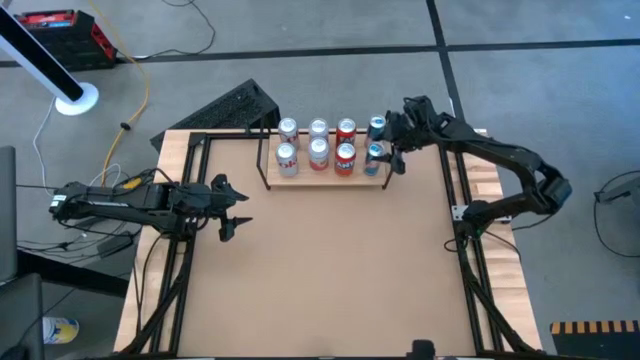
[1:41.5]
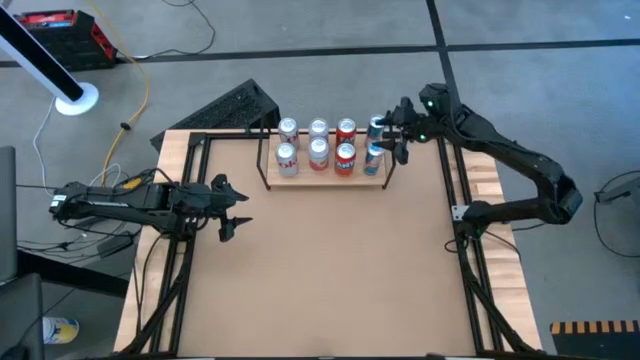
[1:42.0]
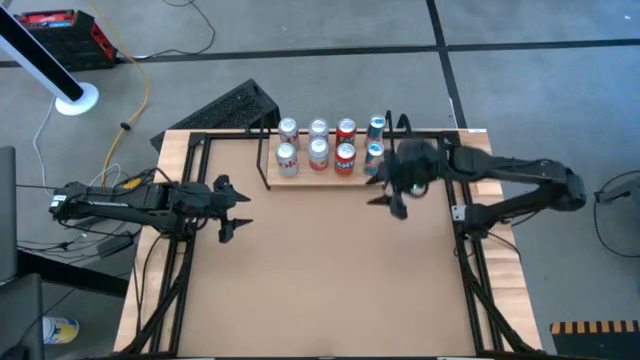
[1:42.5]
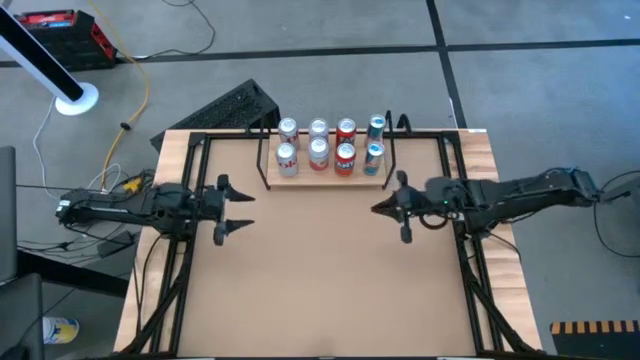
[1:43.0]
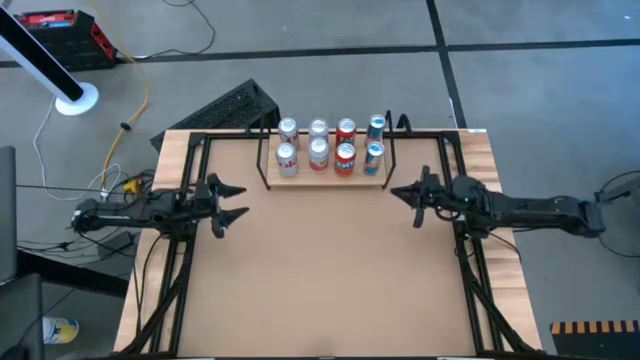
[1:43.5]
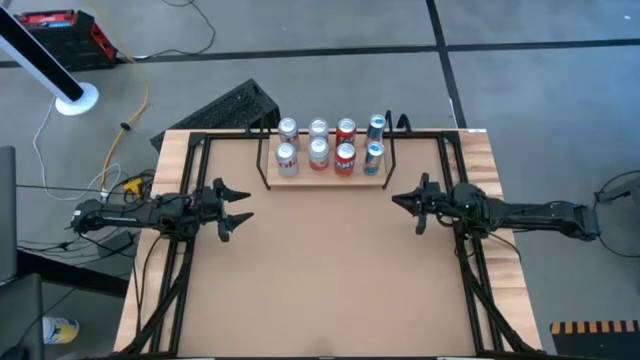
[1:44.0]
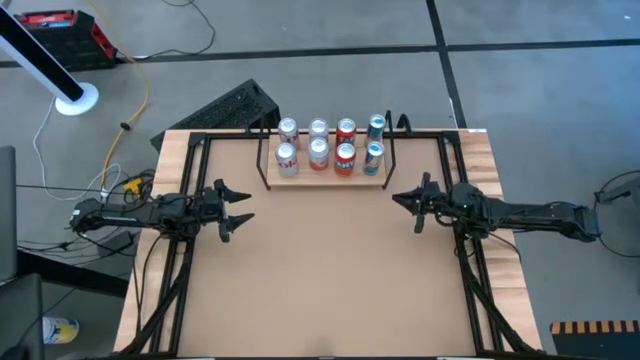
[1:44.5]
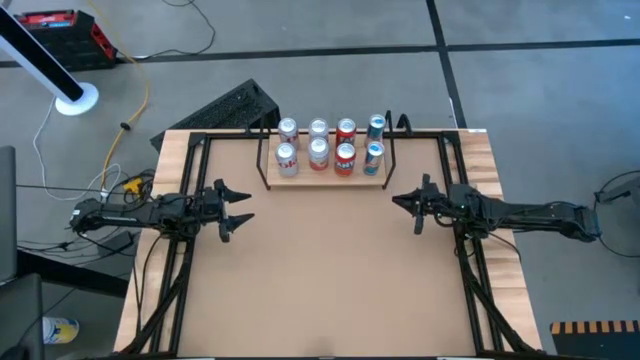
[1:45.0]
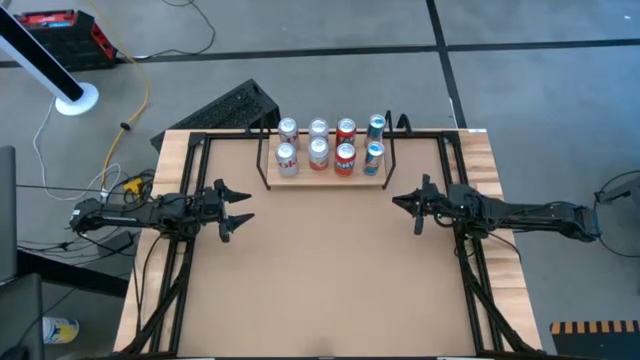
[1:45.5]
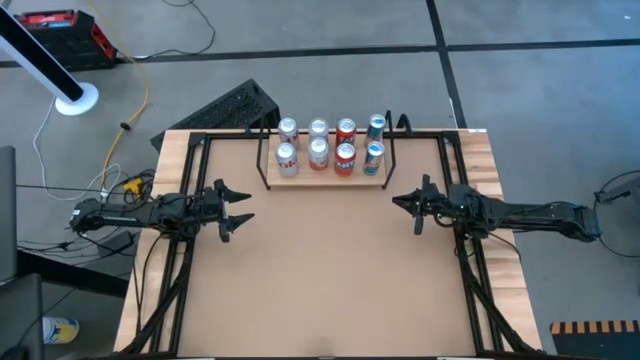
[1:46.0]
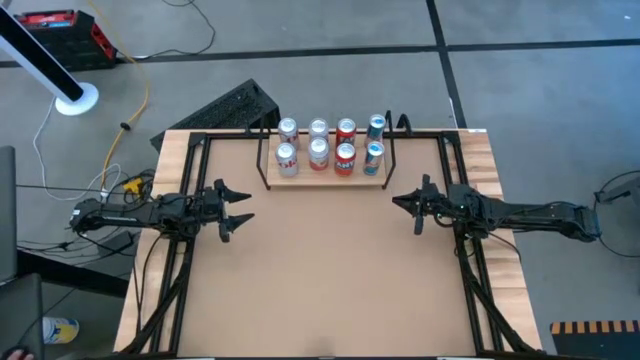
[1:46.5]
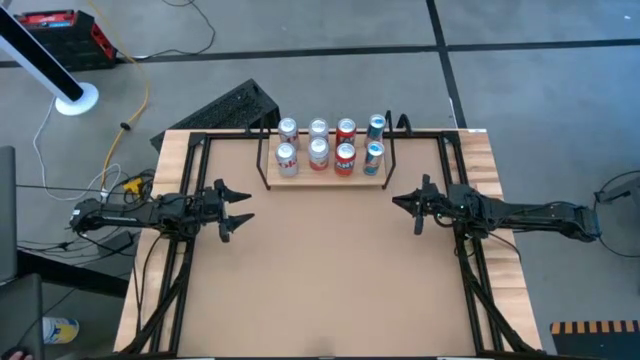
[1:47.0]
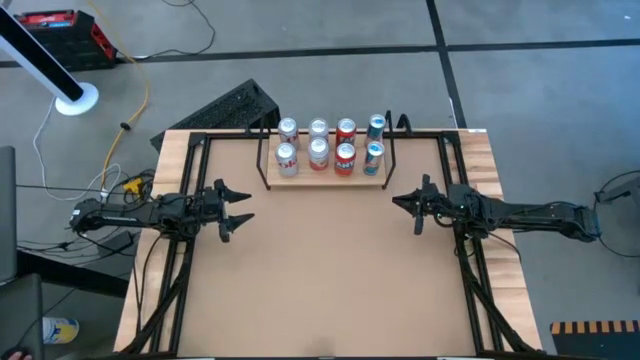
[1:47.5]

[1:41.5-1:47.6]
Task: Place canned beverage on shelf
Return to Home Position

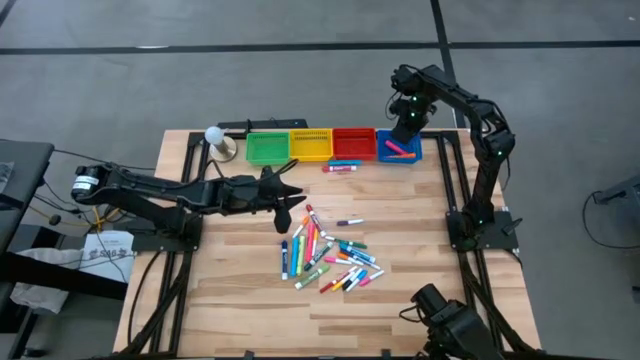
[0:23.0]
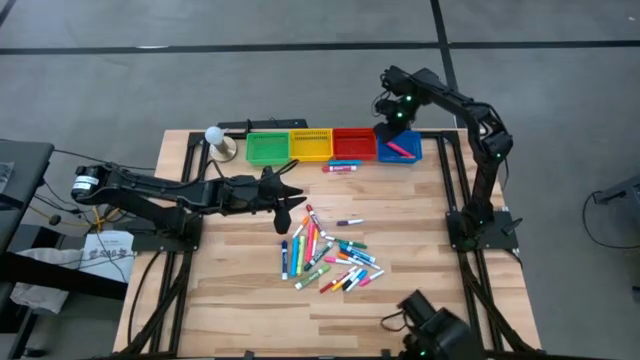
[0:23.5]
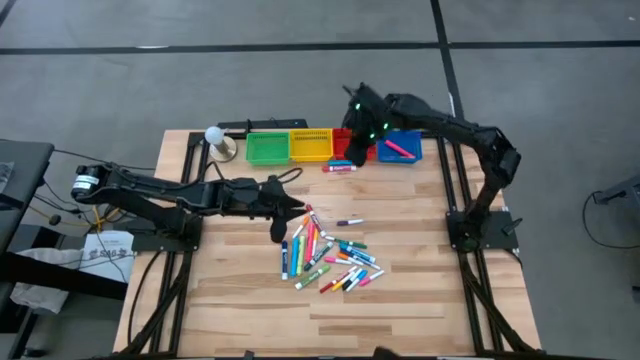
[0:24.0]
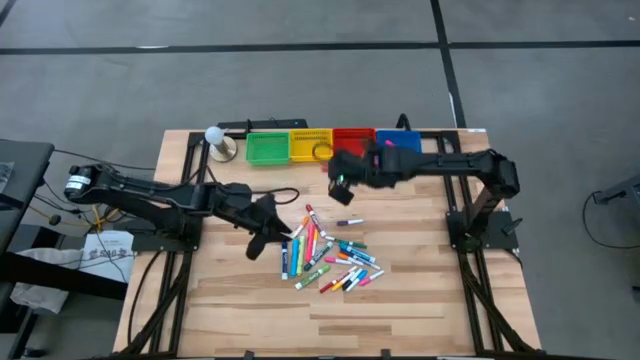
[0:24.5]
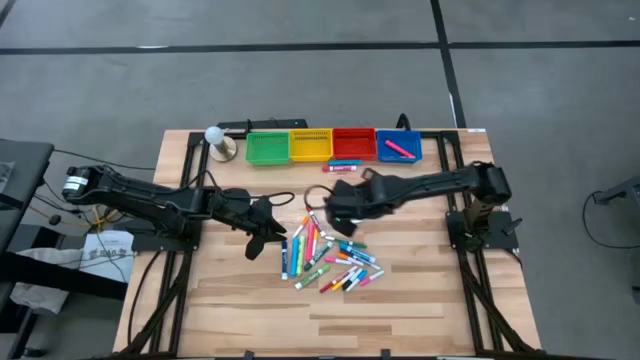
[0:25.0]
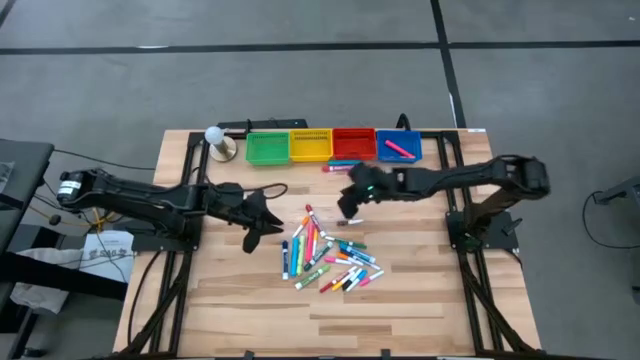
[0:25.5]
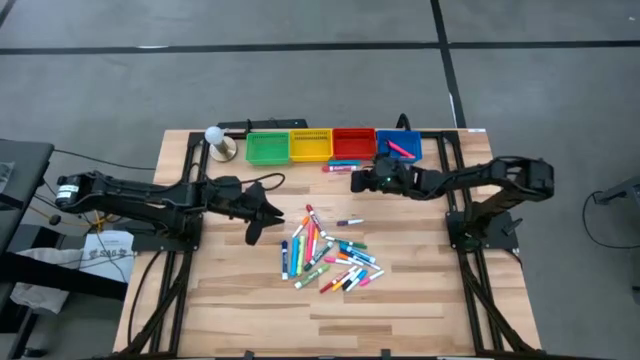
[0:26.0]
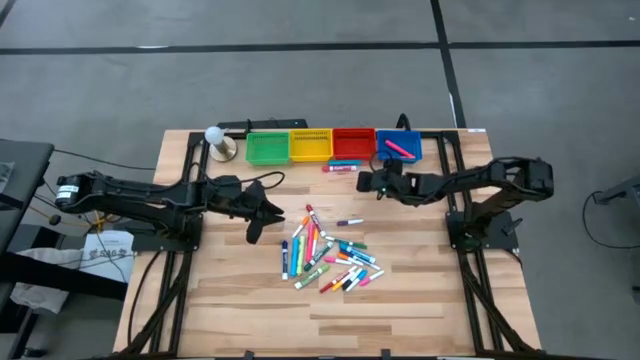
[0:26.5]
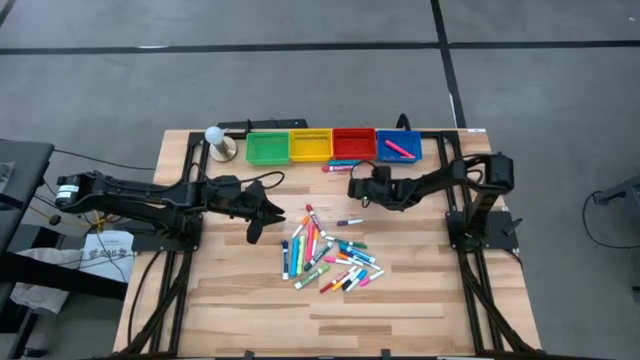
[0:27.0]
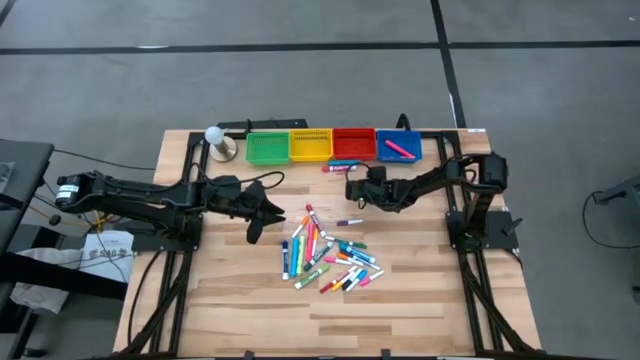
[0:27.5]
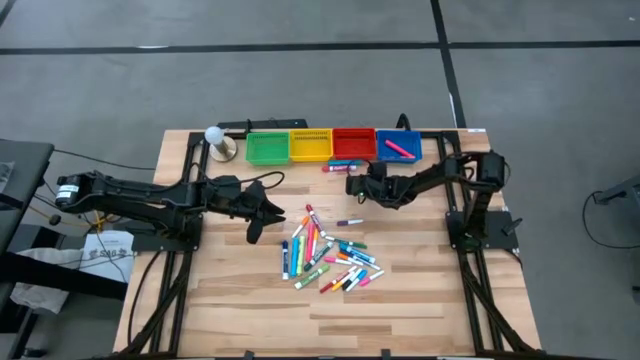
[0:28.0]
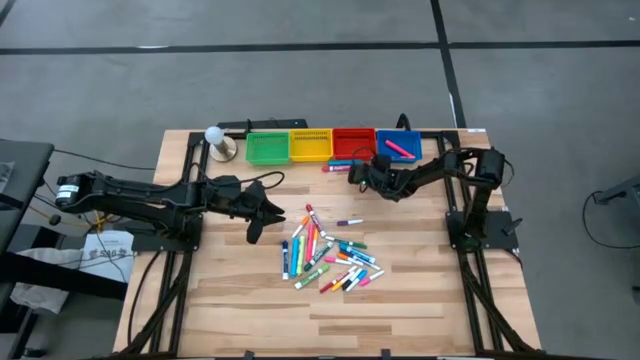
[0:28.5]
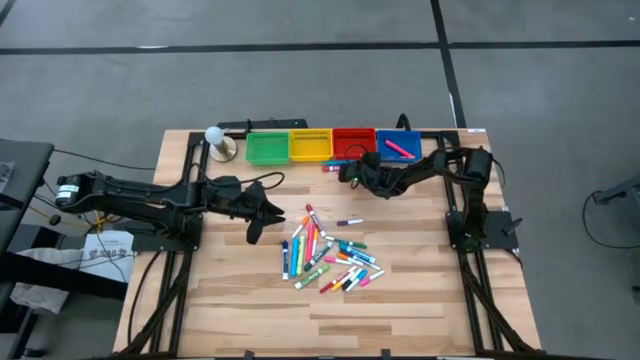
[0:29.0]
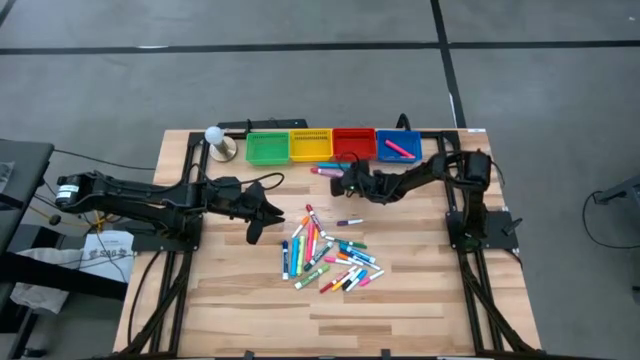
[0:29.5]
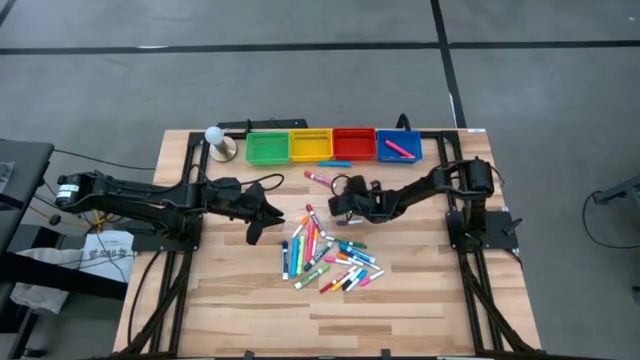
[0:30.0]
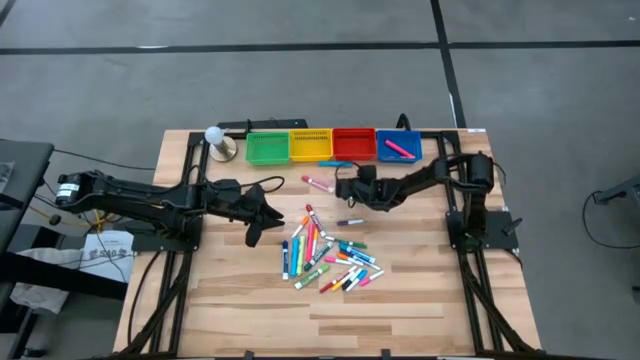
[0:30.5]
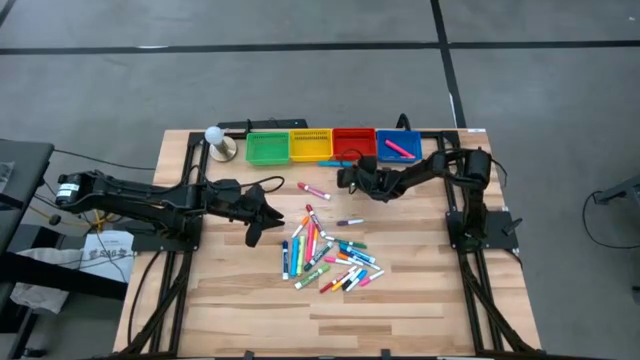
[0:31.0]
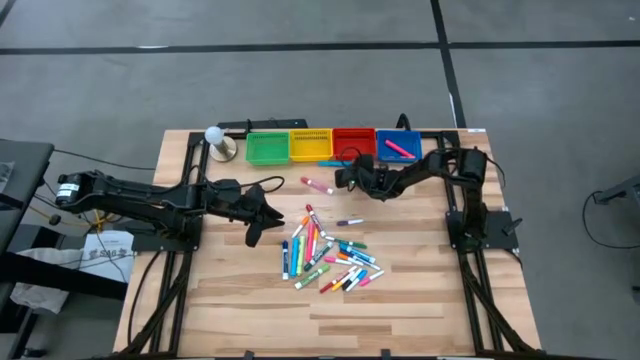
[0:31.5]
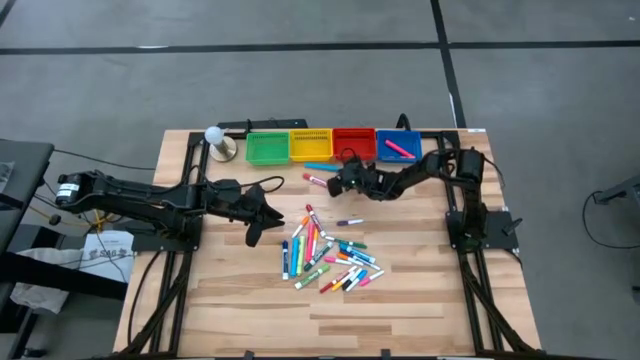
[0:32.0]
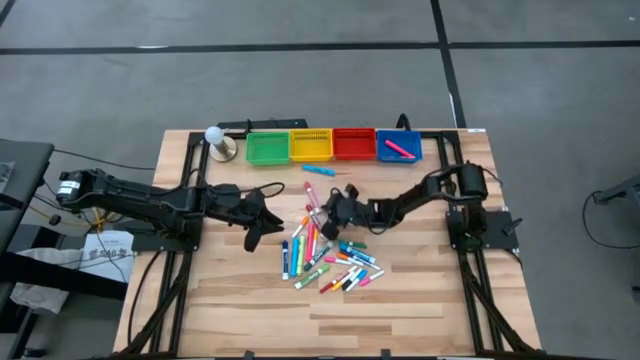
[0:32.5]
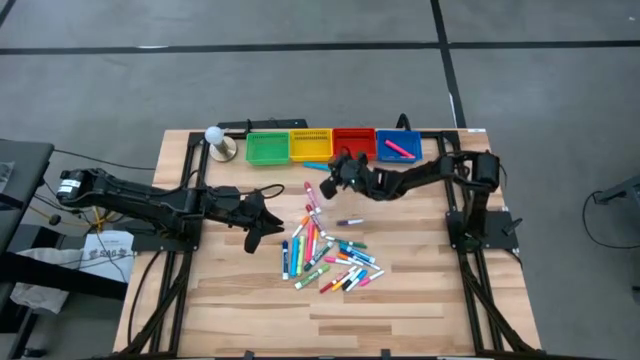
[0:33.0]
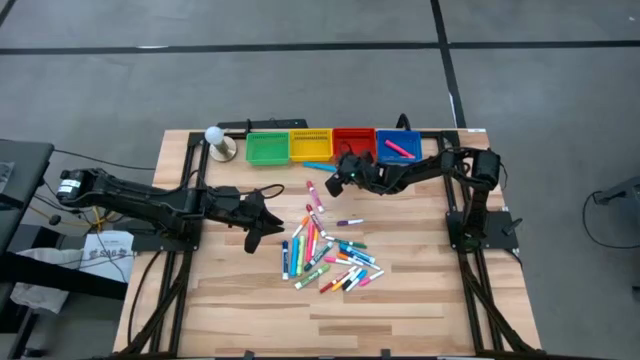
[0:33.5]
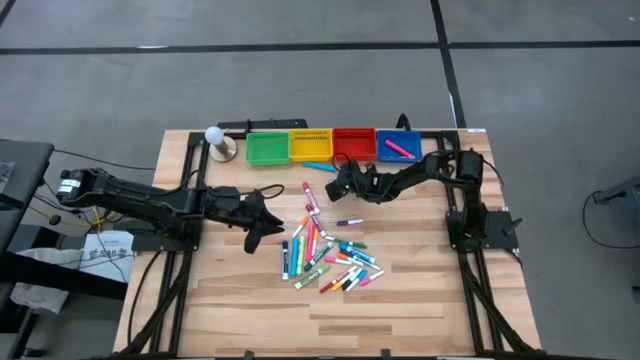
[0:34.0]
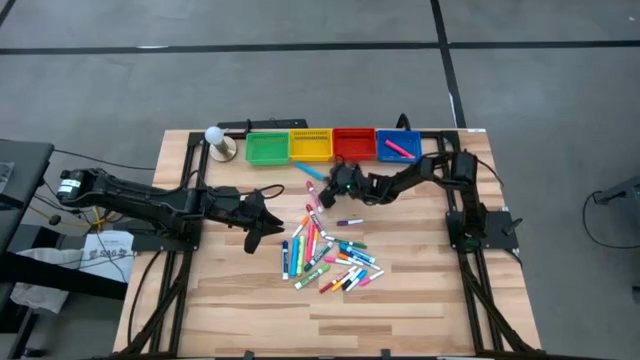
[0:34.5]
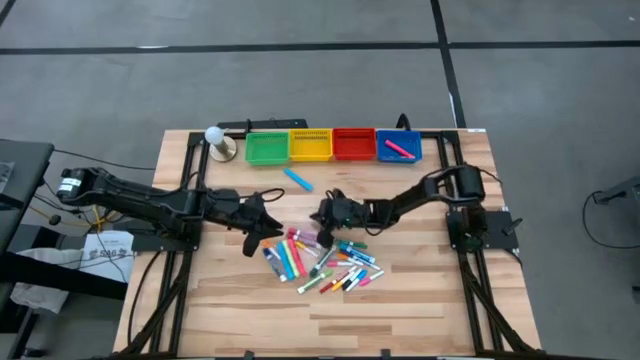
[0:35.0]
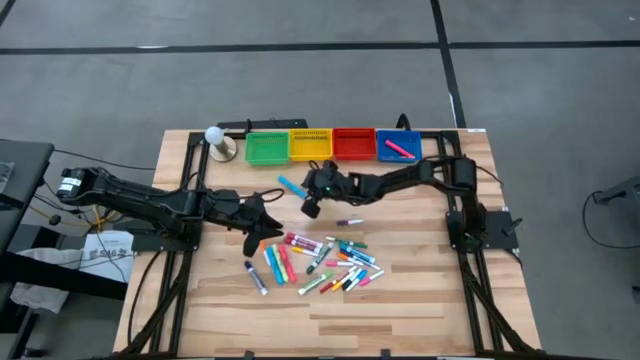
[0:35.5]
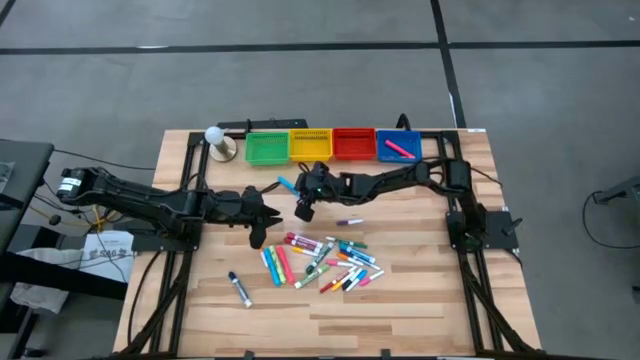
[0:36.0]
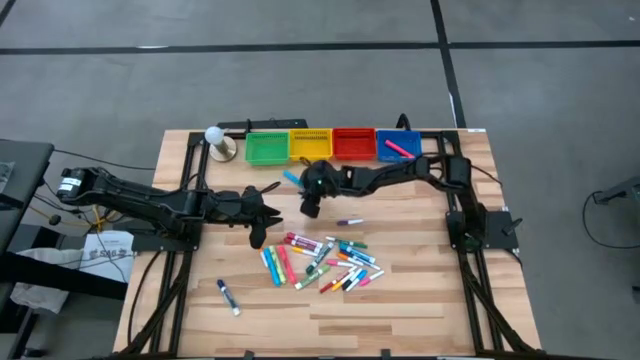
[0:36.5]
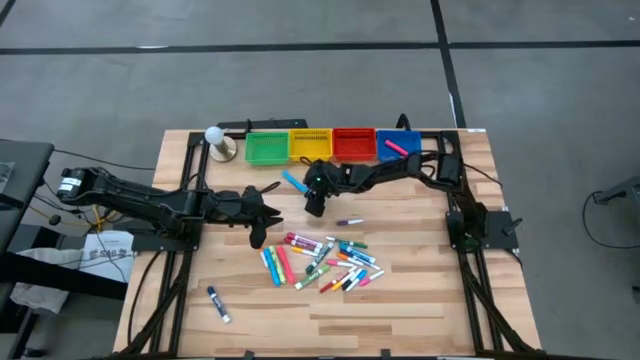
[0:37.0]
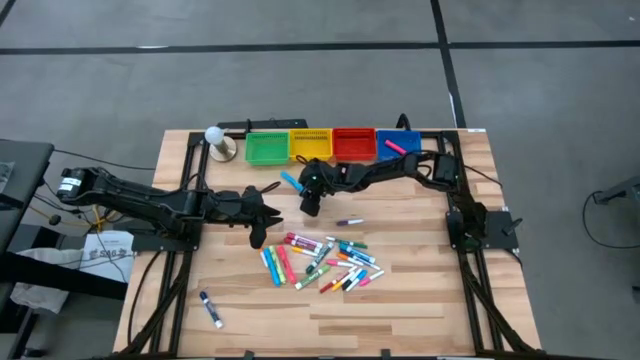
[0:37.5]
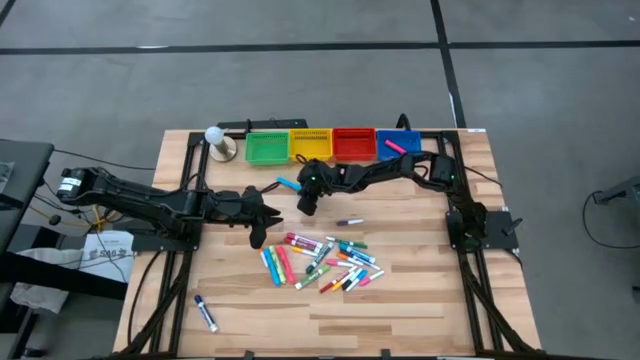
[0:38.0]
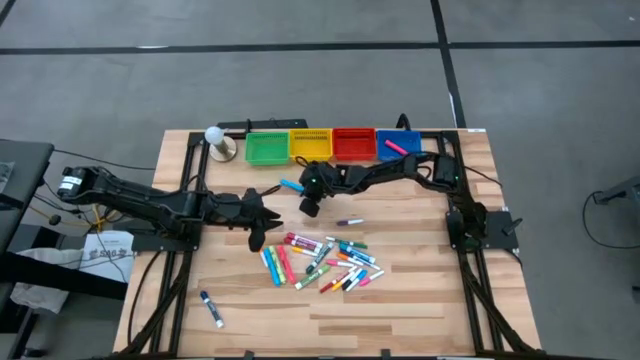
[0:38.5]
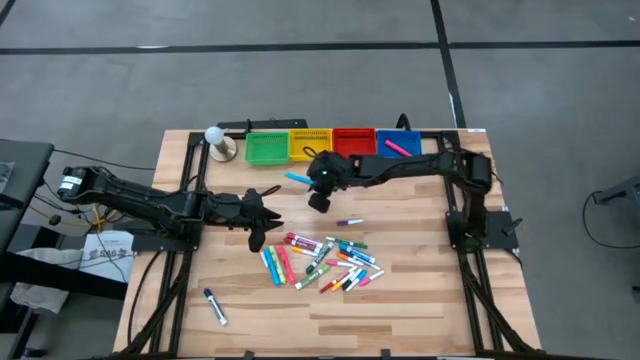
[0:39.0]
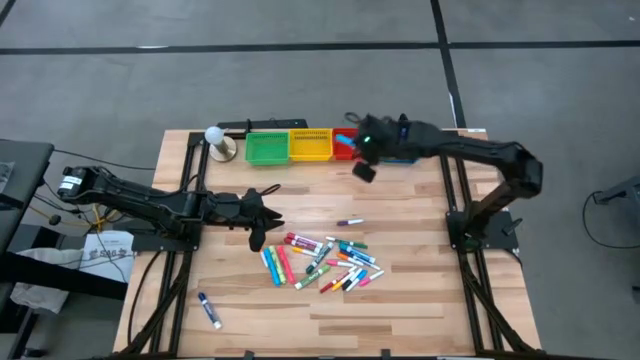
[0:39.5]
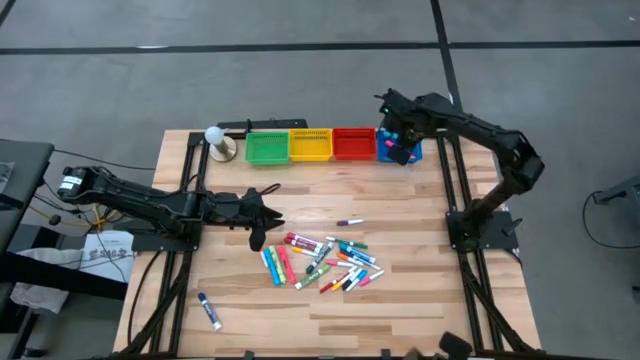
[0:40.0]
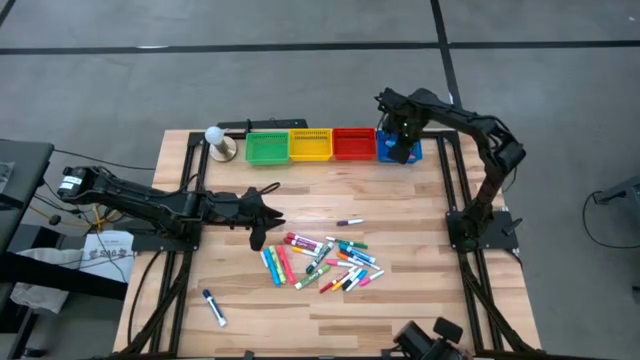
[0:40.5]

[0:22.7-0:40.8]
Task: Pick & Place Markers
Put the blue highlighter pen into the blue basket
